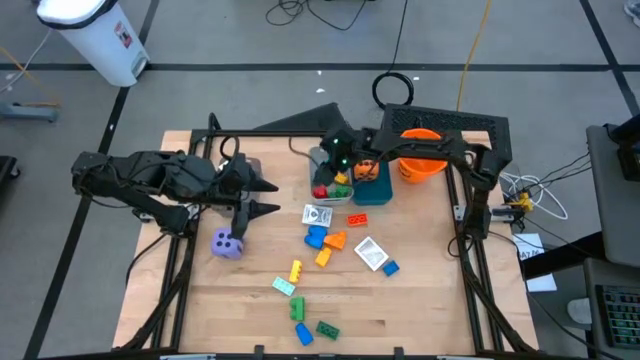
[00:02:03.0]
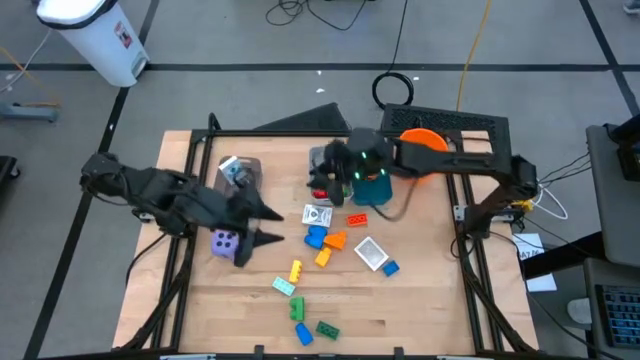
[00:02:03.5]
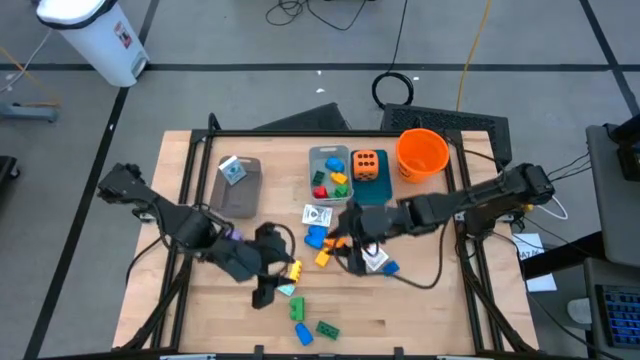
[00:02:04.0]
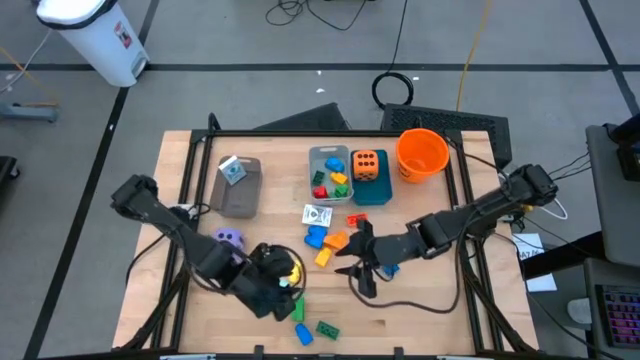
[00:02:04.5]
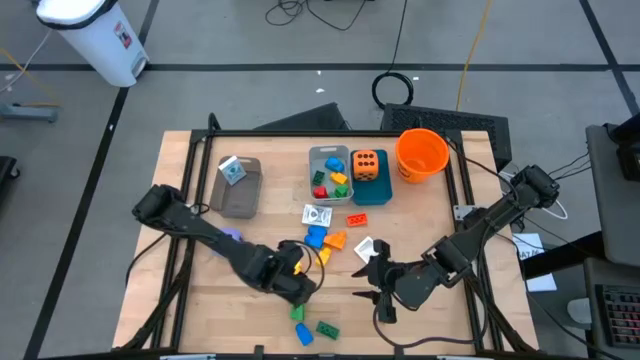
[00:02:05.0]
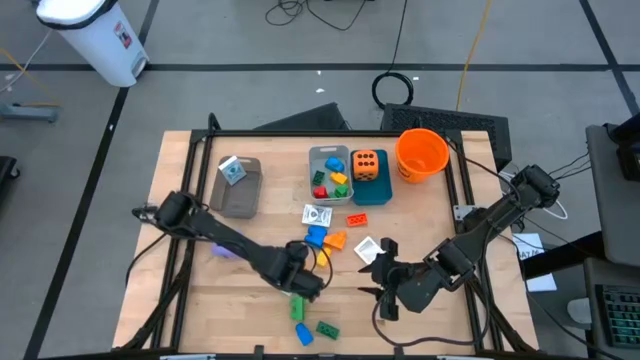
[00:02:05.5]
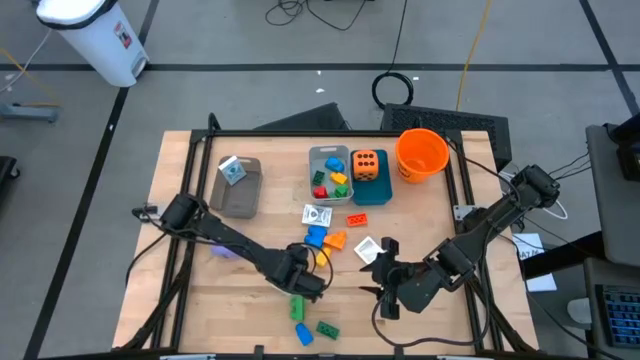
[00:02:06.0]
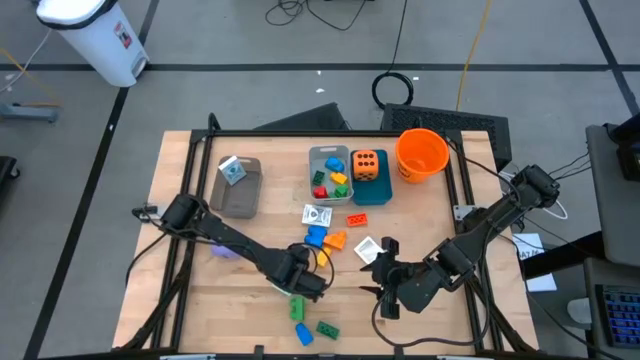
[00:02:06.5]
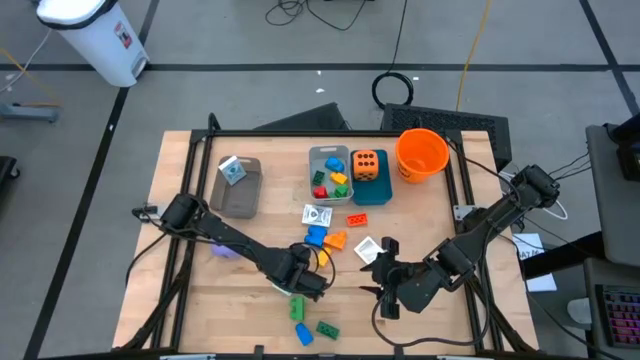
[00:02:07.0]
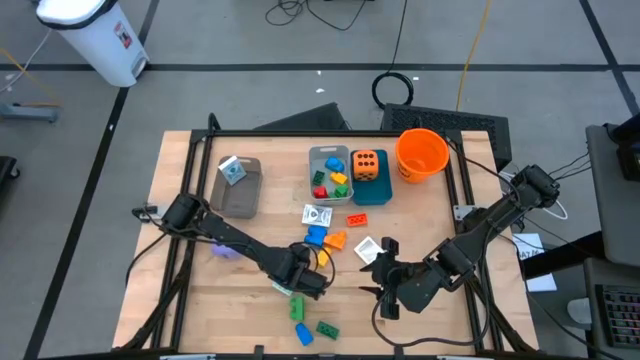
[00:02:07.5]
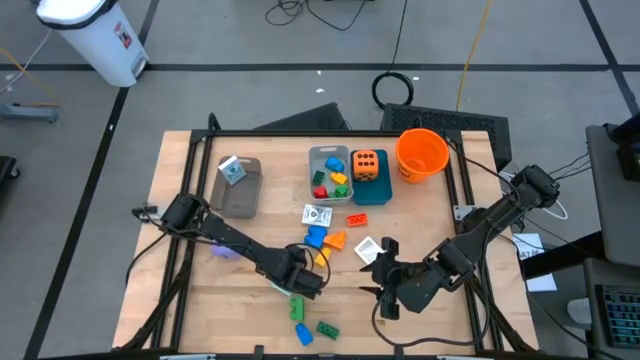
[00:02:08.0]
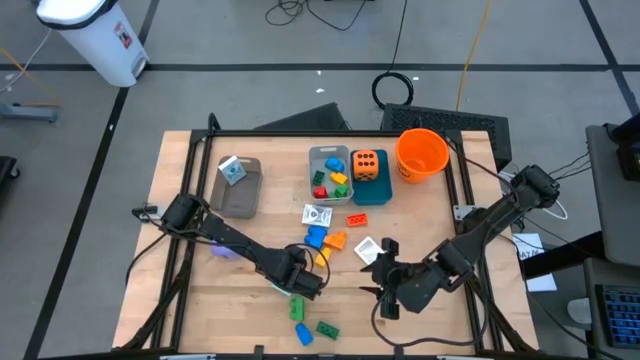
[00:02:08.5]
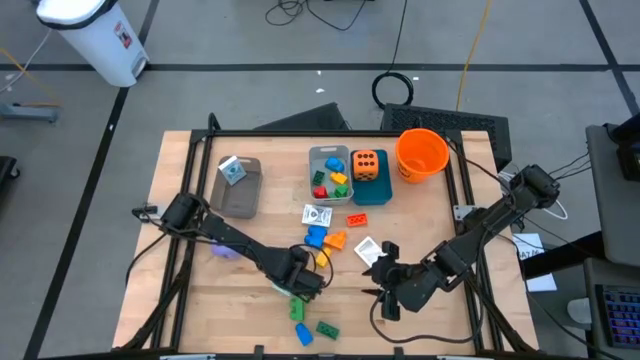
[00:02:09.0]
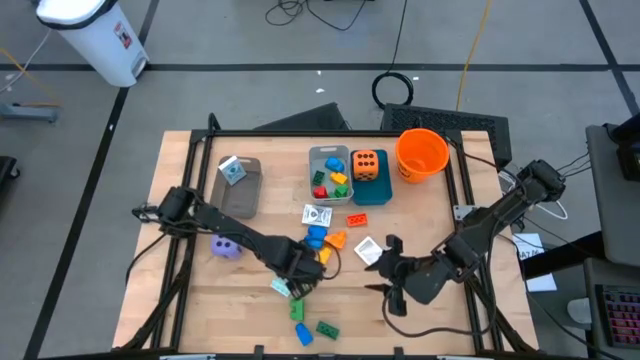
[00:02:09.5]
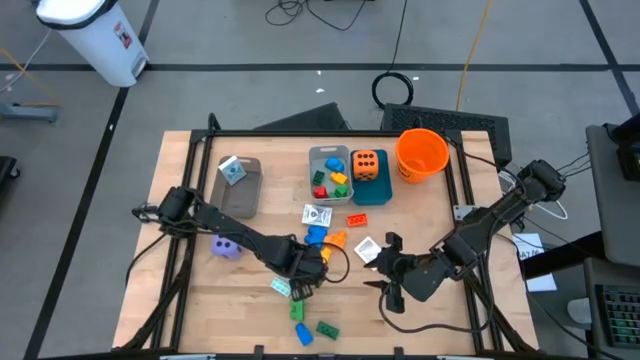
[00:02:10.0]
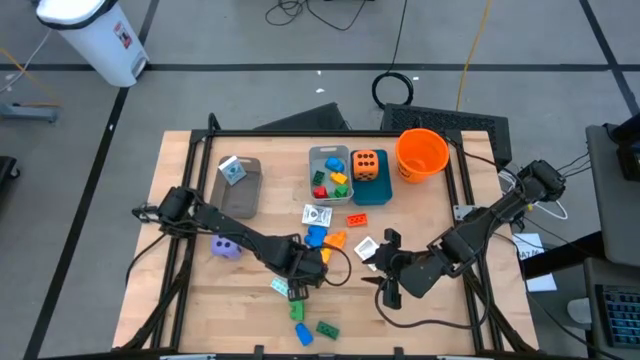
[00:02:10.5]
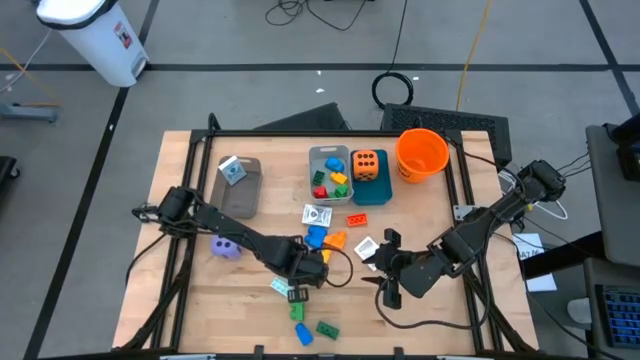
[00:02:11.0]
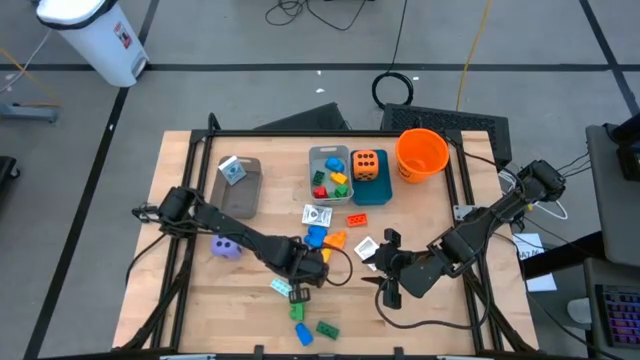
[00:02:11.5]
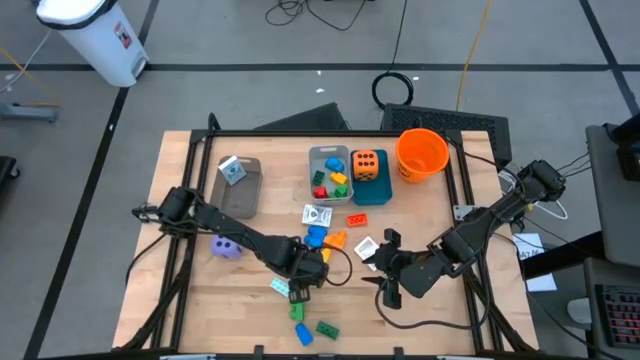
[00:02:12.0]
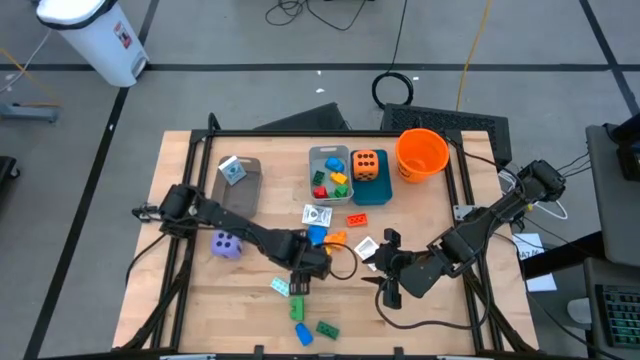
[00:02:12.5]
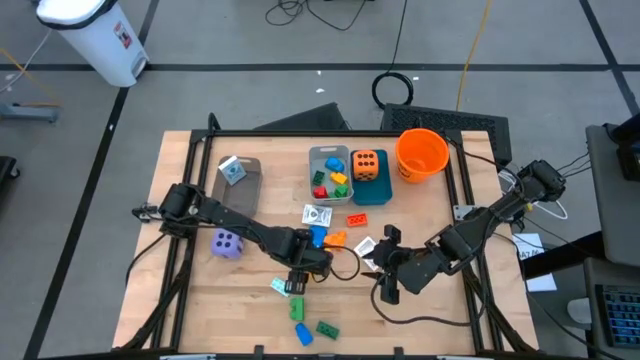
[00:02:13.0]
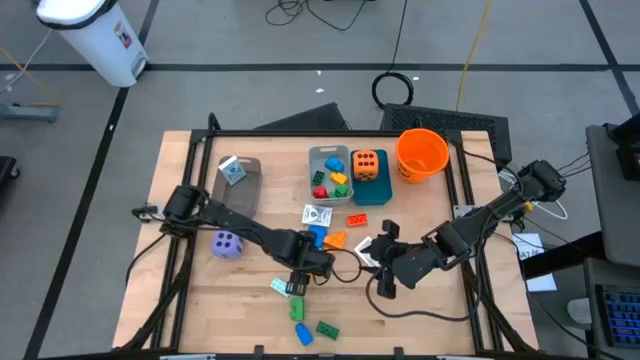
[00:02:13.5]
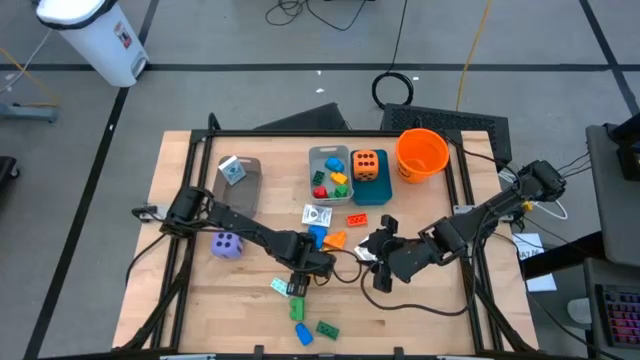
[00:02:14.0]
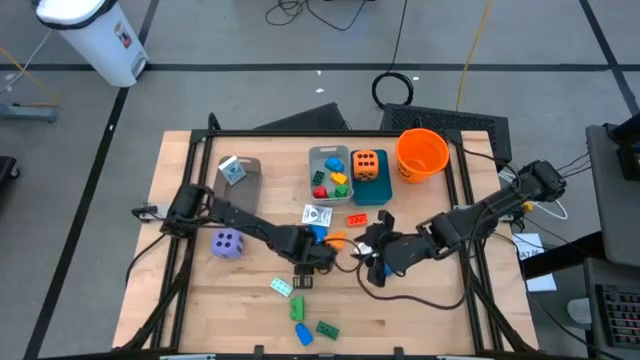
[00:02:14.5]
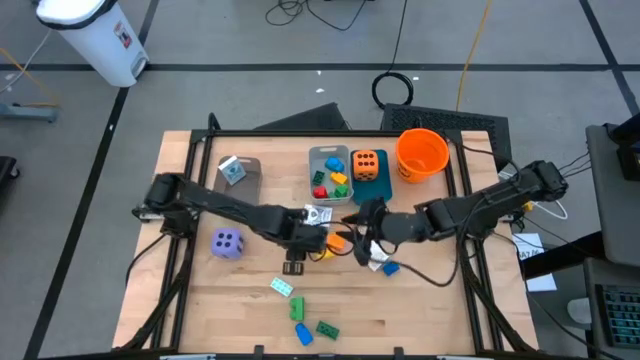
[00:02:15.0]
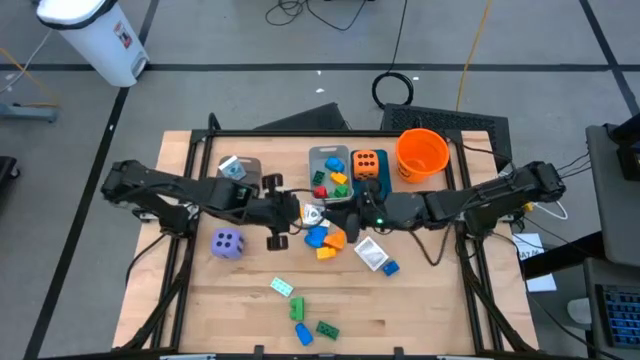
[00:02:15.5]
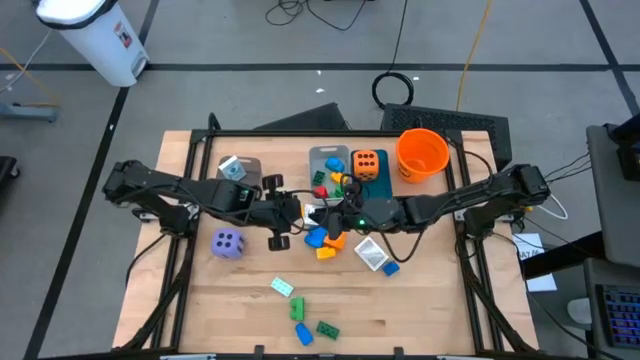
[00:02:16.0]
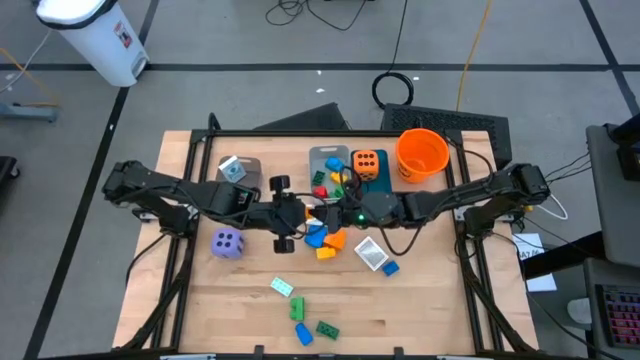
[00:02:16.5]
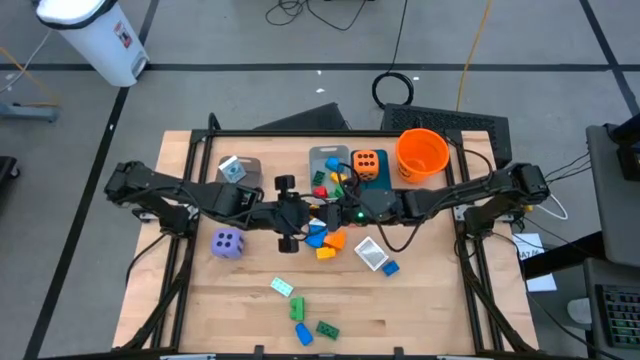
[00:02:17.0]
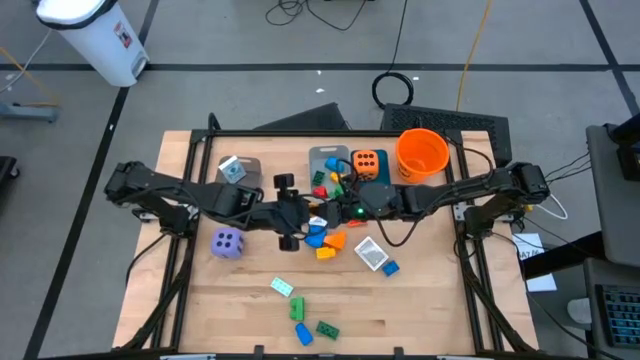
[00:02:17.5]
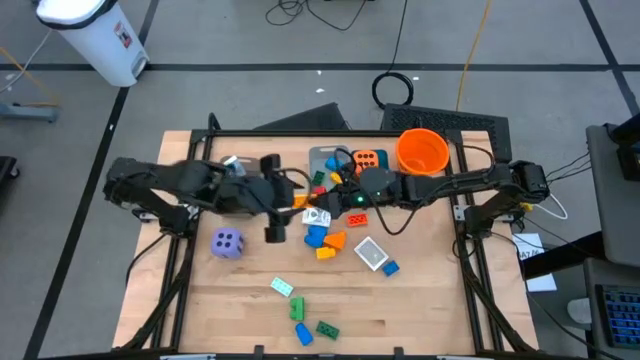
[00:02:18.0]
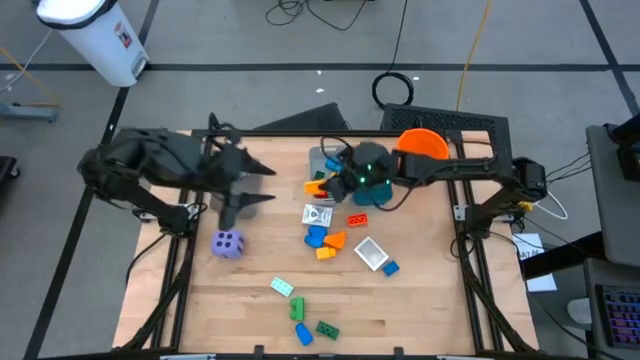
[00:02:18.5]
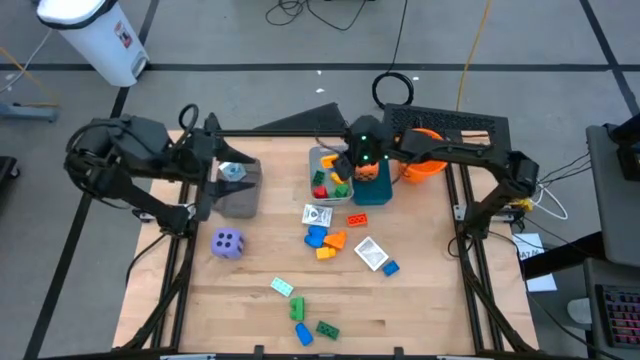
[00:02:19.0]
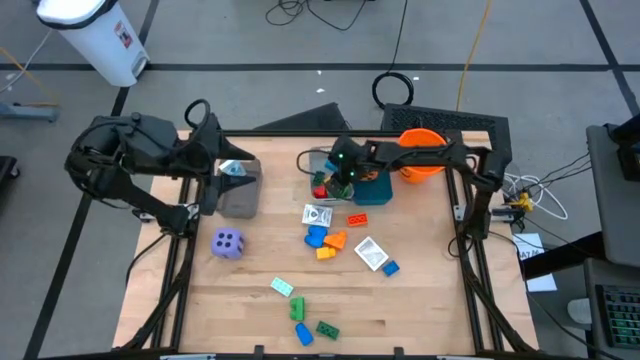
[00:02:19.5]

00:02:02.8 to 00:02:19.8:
Task: Pick & Place Toys
Put the yellow game piece into the gray bin
